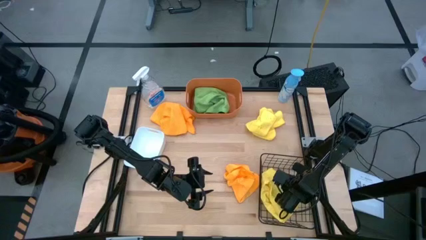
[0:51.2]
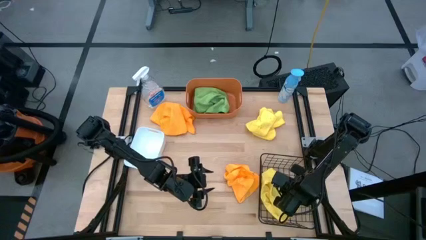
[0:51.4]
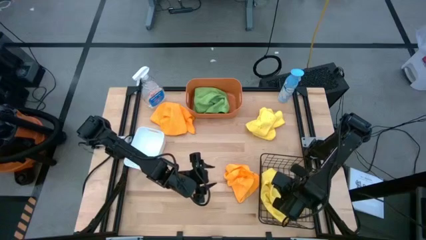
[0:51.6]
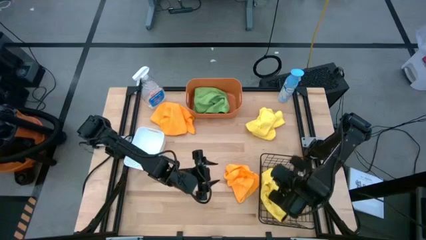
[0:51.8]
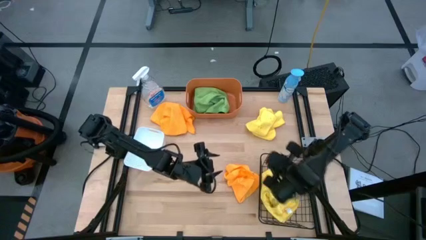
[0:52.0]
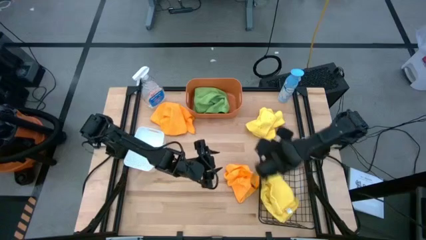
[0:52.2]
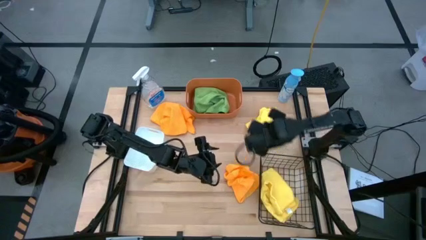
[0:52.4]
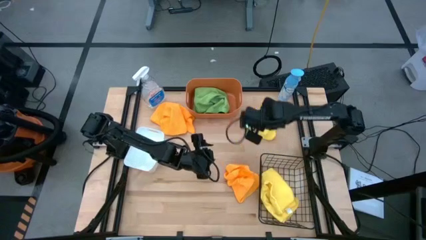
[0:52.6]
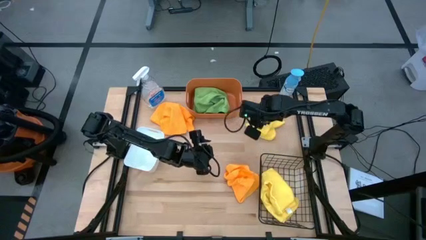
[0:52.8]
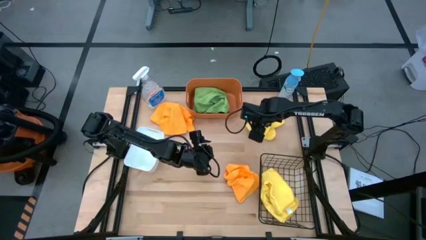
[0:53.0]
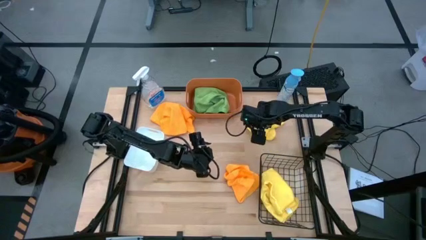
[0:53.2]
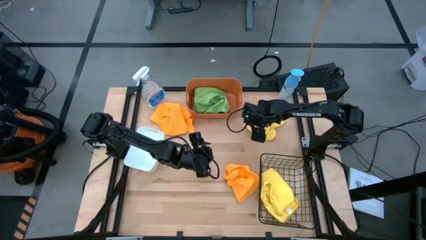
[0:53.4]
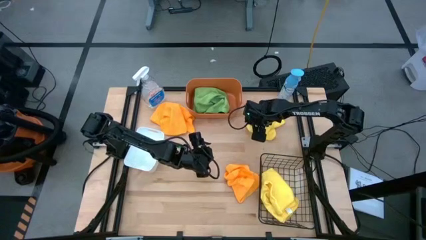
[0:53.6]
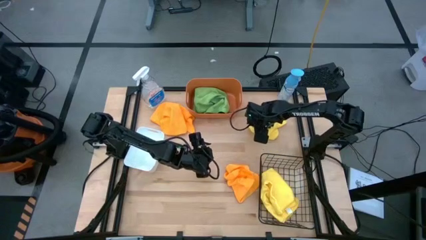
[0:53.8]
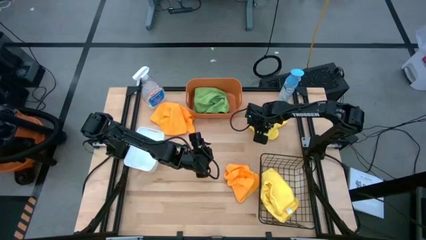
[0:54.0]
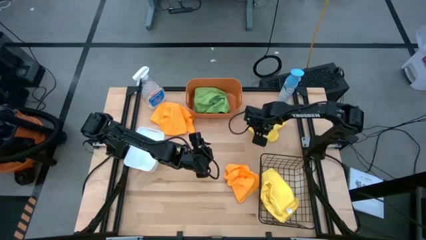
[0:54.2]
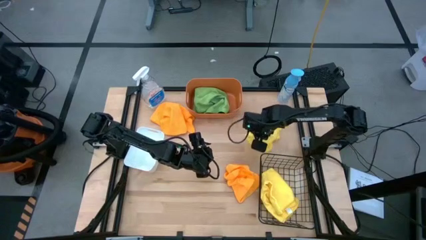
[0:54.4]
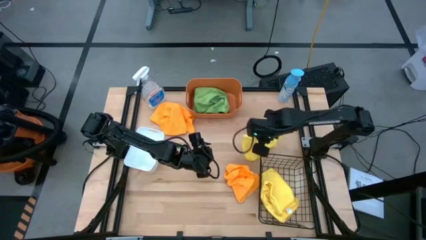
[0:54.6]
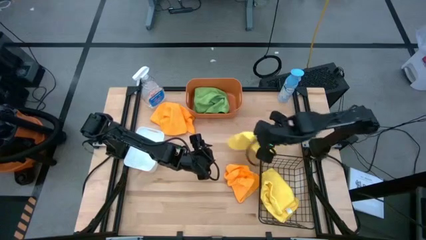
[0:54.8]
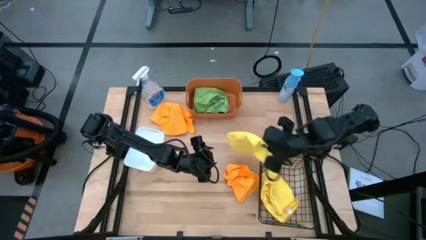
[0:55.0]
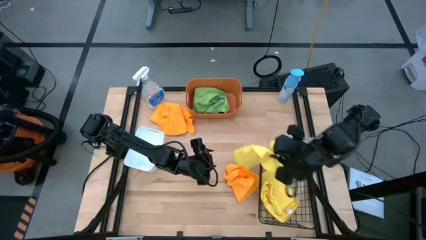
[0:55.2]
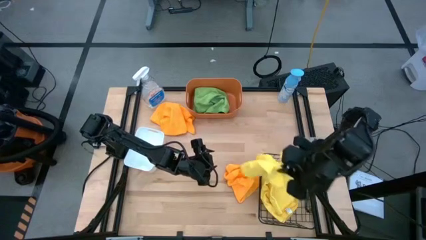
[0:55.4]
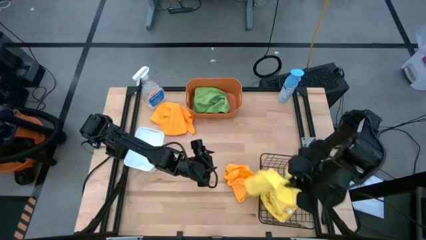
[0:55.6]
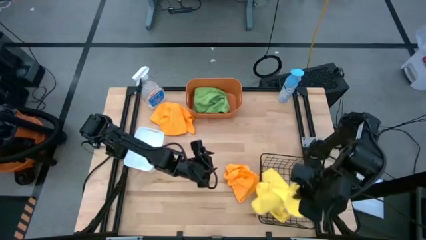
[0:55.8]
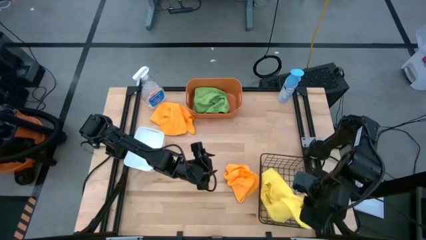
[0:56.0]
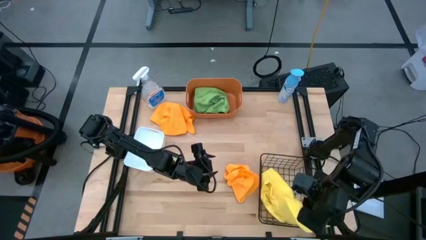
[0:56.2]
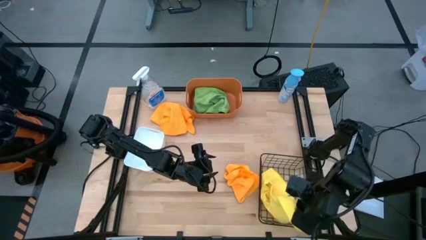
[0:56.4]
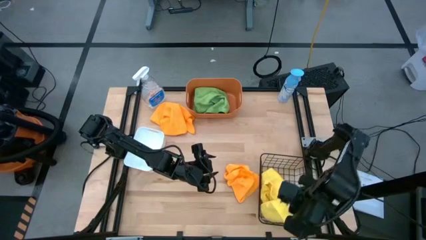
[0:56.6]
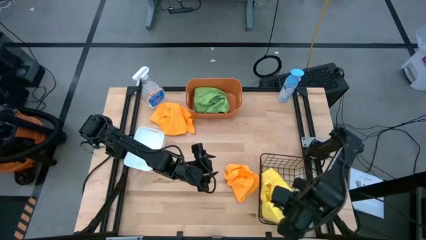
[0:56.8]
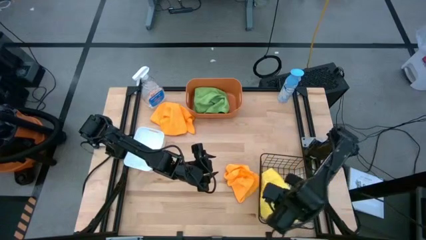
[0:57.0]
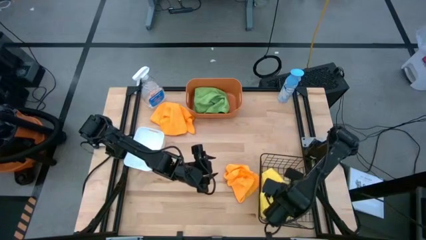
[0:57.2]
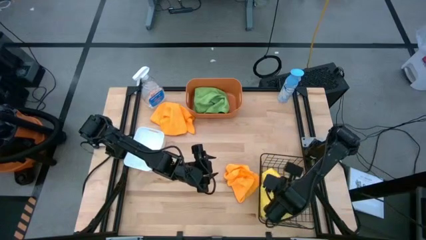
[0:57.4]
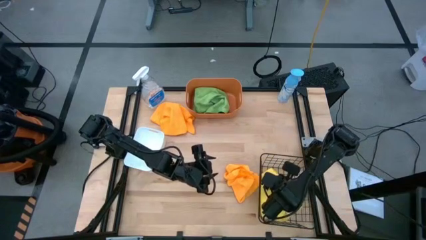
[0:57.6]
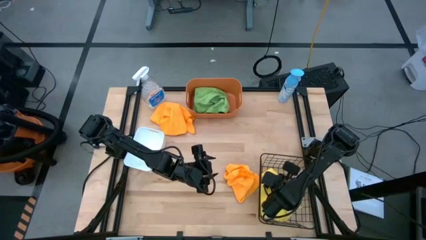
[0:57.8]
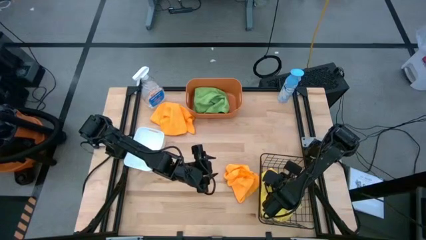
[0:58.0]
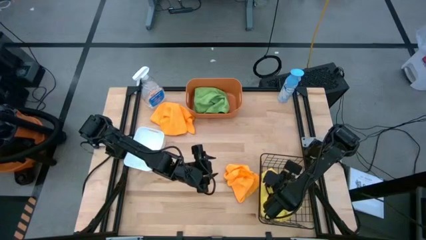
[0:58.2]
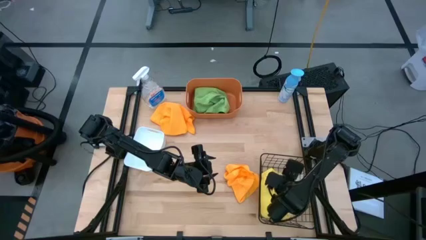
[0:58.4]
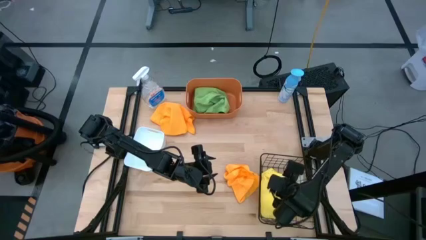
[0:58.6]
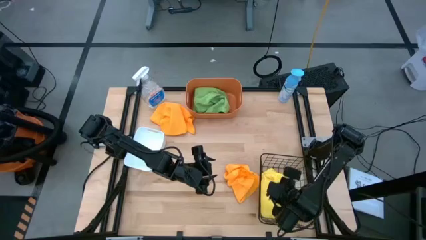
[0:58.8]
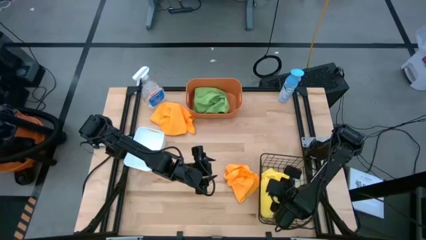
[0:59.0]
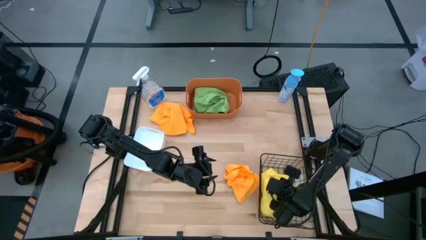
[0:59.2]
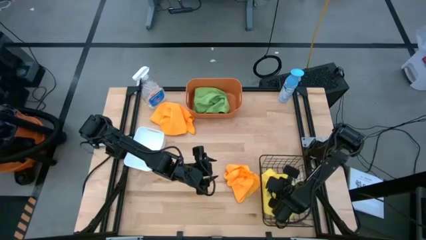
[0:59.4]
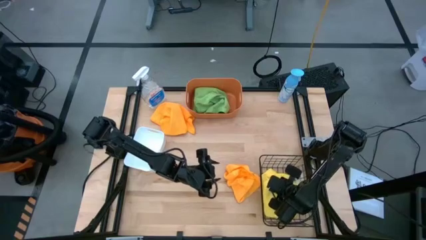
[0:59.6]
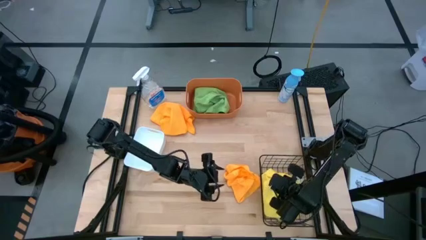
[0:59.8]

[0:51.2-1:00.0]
Task: Sort microfiber towel by color & place in baskets
Put the yellow microfiber cloth into the black wire basket

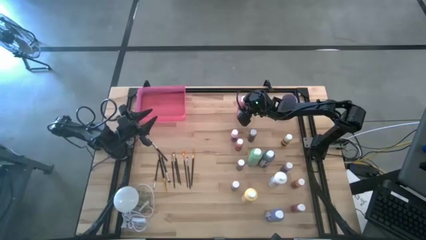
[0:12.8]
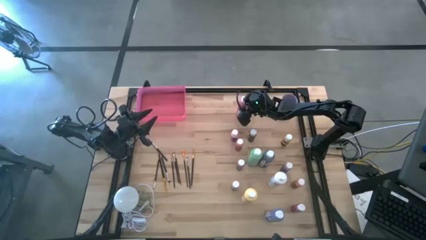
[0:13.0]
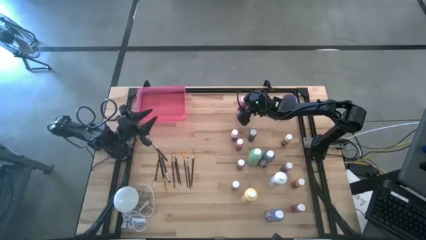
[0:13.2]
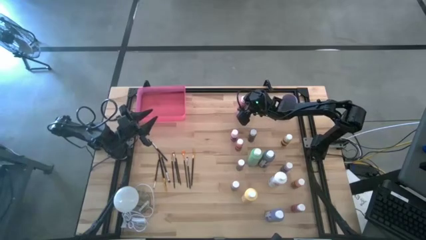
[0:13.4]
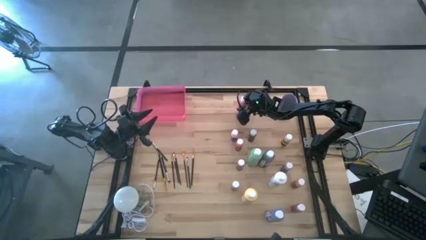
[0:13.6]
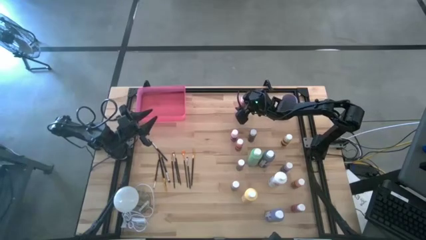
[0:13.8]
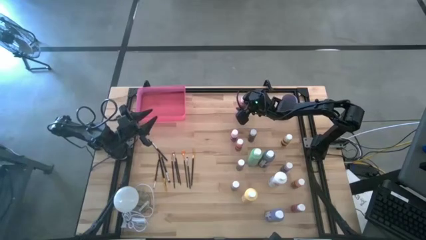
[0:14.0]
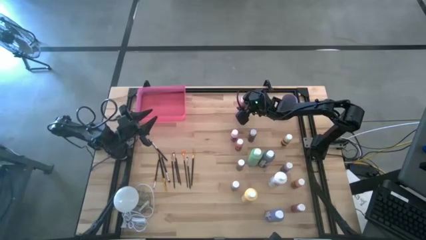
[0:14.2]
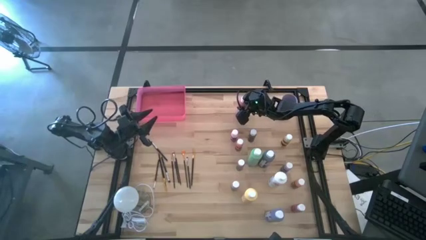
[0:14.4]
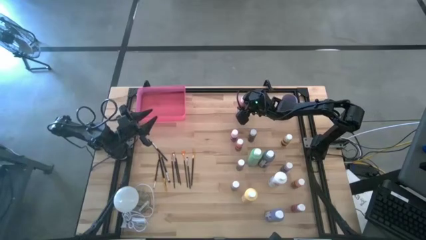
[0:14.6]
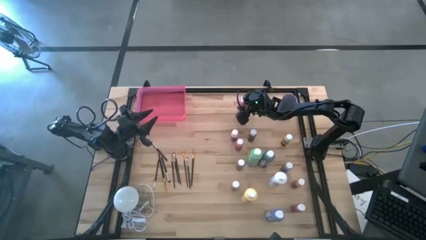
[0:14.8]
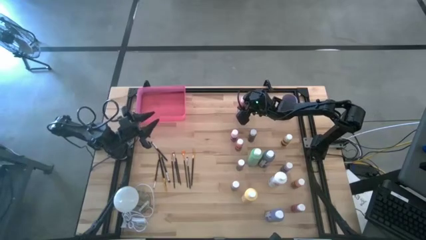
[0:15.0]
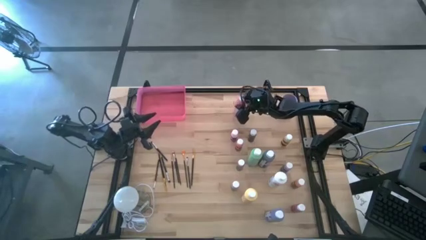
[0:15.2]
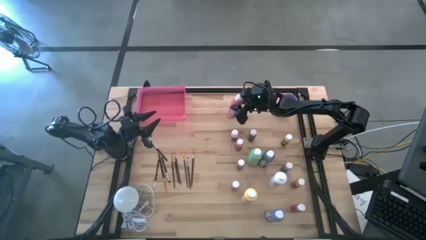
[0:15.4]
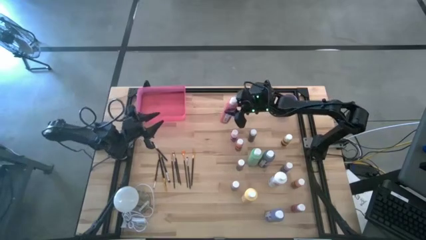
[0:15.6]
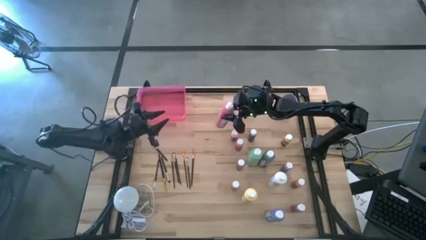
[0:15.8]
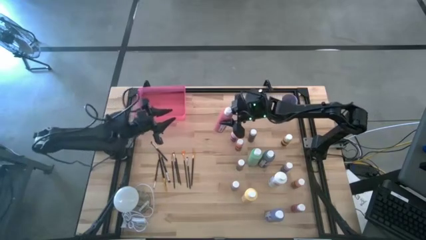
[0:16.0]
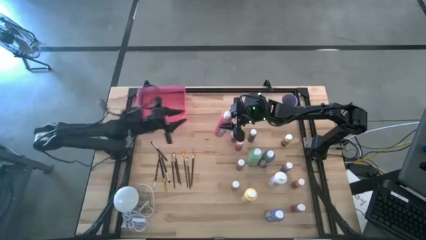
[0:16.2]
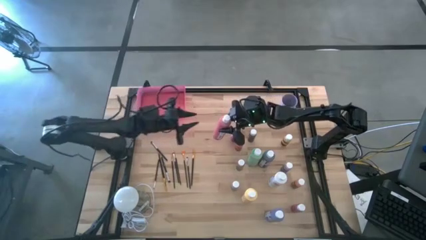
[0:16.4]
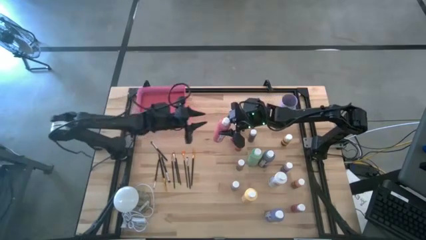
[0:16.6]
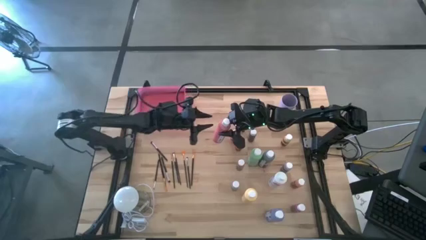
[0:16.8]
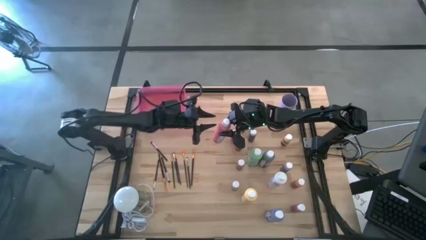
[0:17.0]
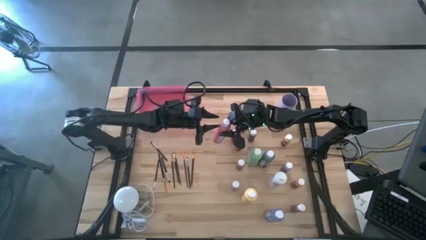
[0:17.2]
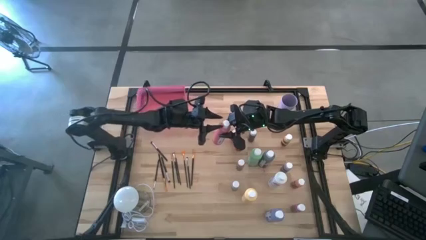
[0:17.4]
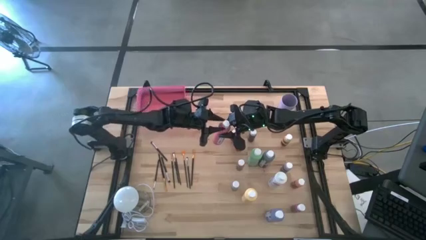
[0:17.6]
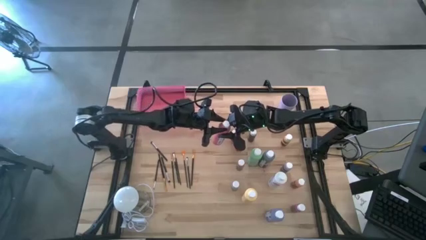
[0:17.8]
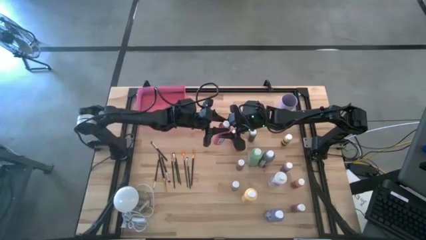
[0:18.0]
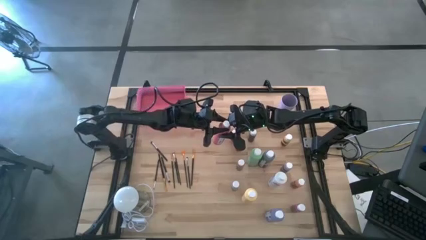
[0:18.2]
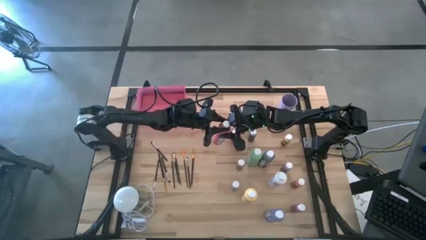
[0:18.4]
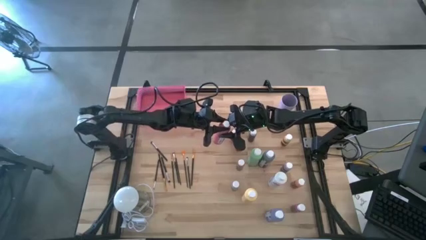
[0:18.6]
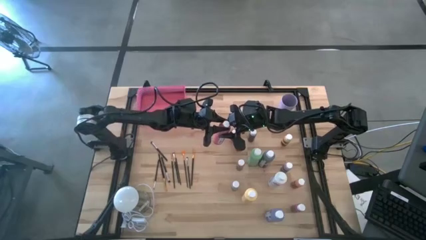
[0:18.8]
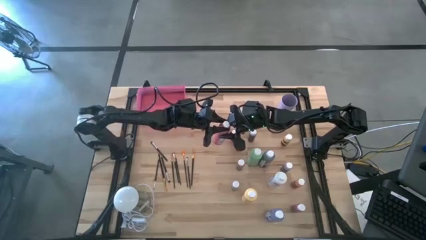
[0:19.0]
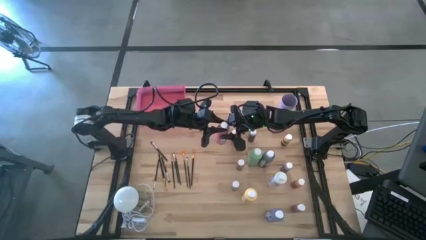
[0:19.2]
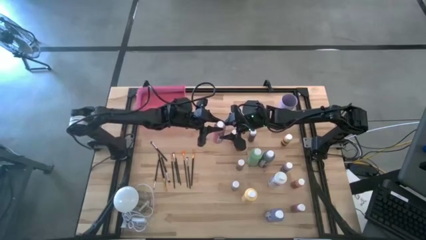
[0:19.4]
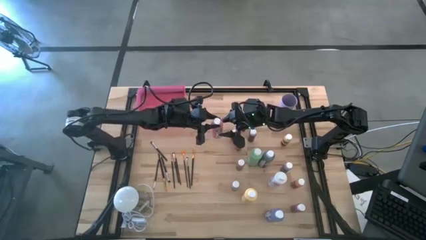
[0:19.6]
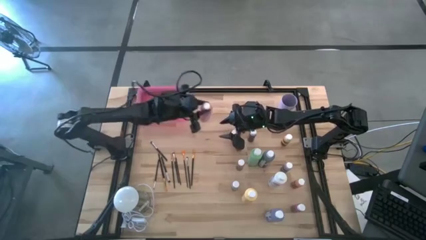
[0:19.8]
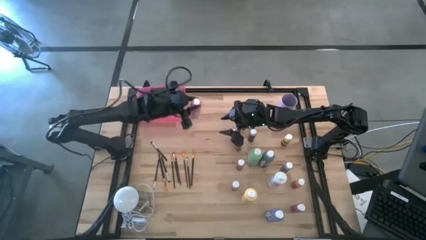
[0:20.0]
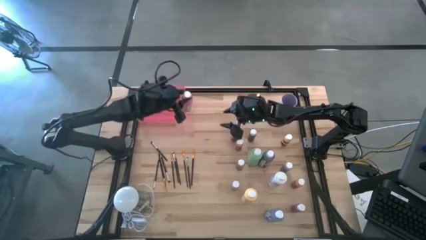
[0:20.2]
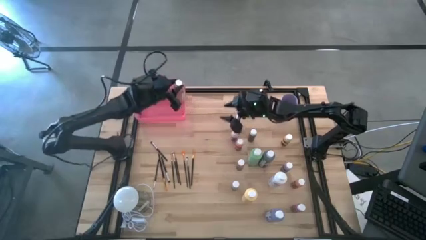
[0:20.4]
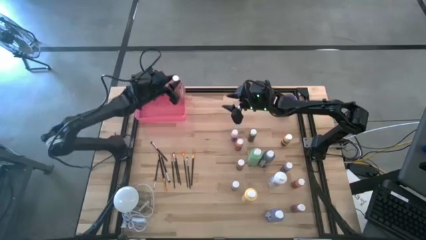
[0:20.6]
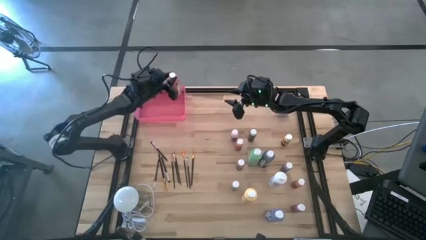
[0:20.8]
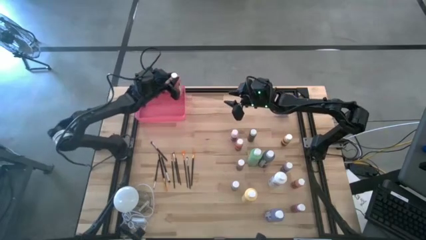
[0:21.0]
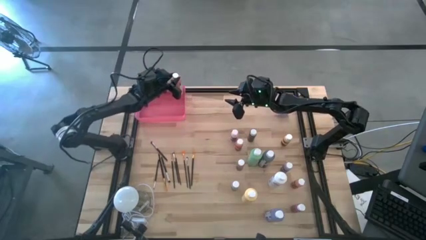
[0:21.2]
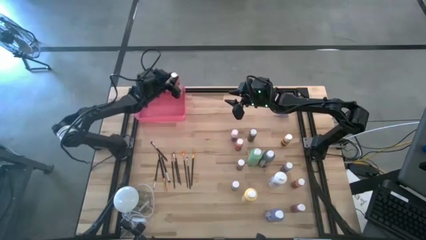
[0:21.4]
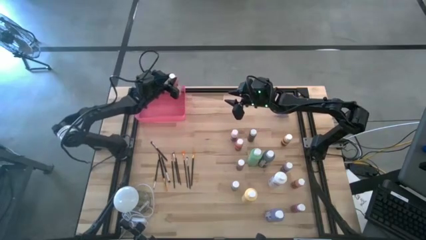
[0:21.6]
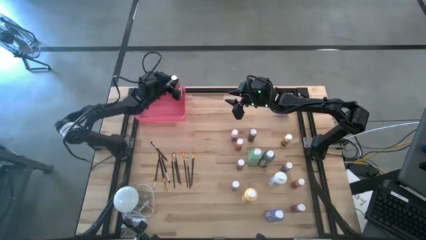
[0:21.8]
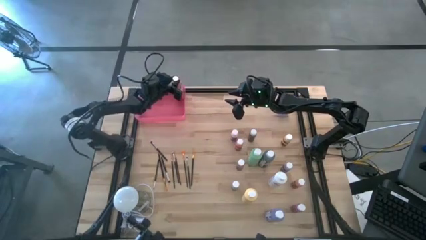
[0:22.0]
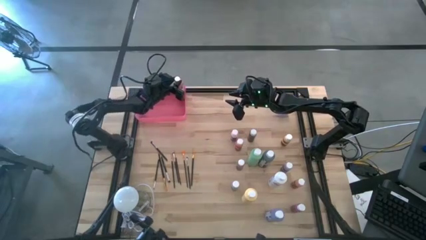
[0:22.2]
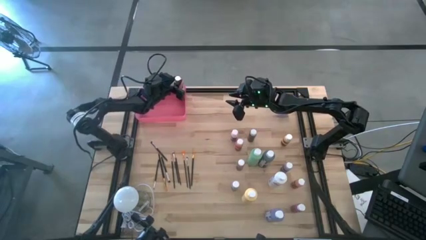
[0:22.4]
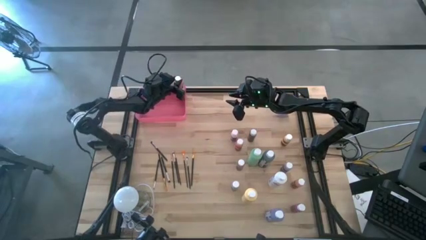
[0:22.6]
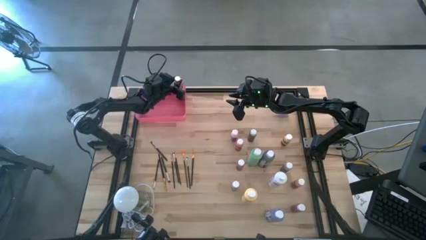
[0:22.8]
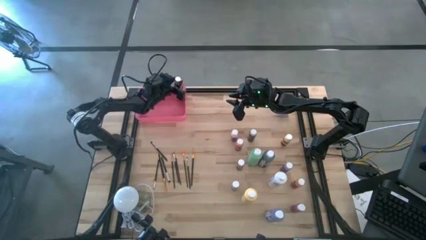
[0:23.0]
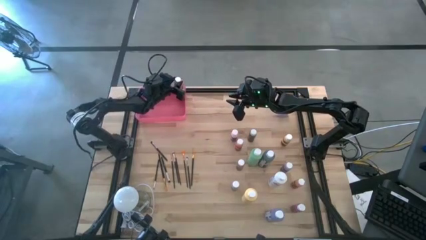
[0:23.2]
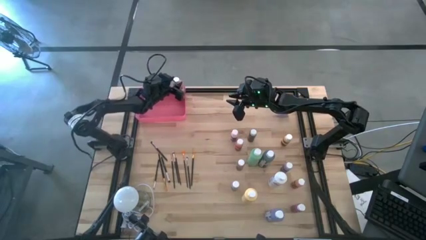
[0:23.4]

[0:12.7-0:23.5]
Task: Pick & Place Paint Supplies
Put the large pink paint bottle into the pink bin
